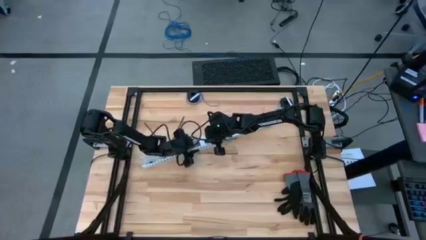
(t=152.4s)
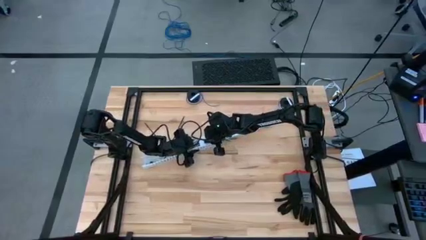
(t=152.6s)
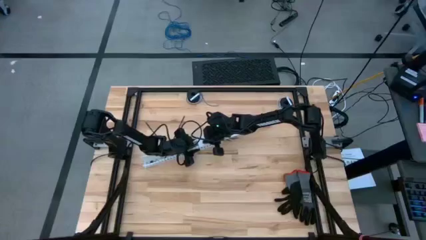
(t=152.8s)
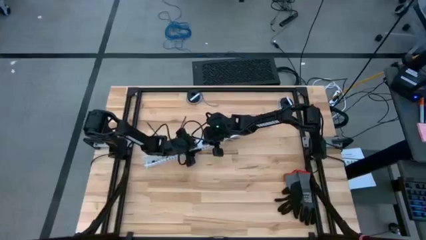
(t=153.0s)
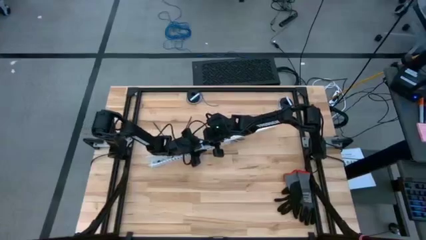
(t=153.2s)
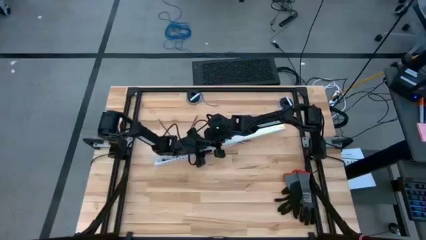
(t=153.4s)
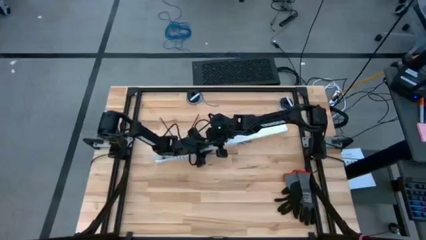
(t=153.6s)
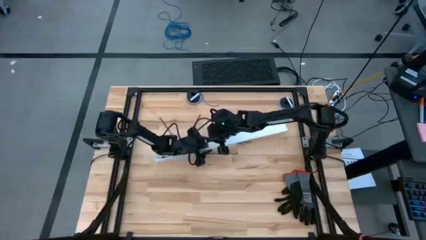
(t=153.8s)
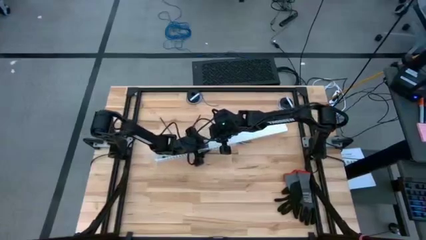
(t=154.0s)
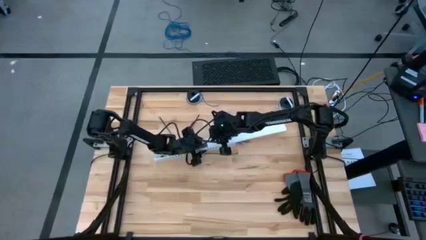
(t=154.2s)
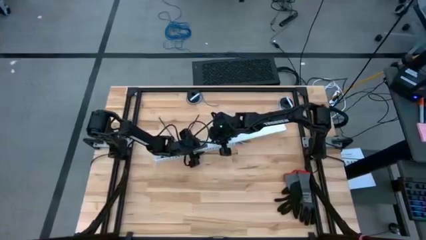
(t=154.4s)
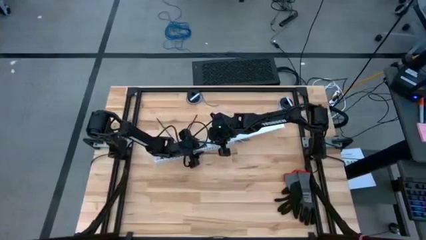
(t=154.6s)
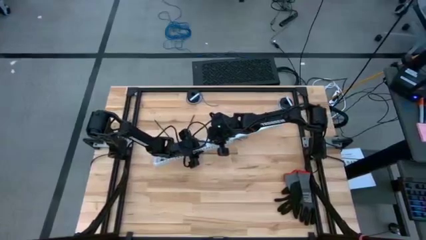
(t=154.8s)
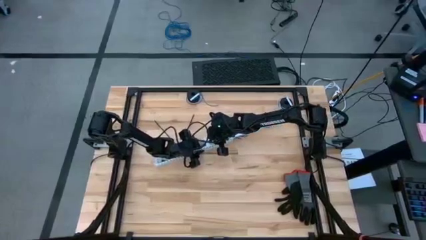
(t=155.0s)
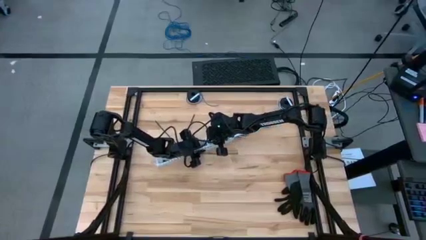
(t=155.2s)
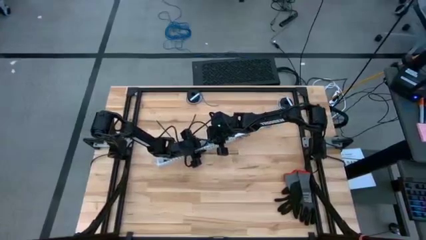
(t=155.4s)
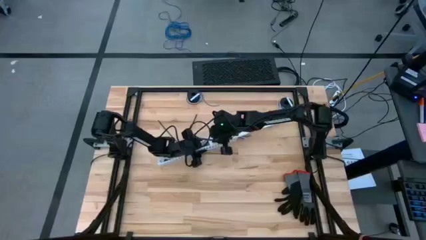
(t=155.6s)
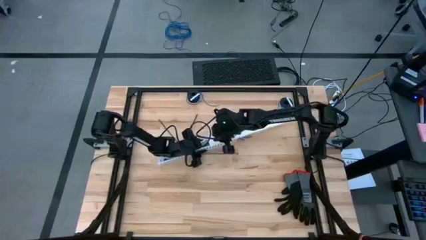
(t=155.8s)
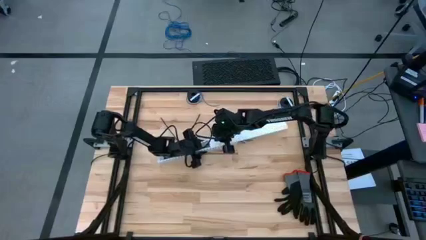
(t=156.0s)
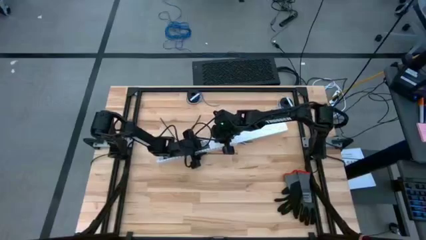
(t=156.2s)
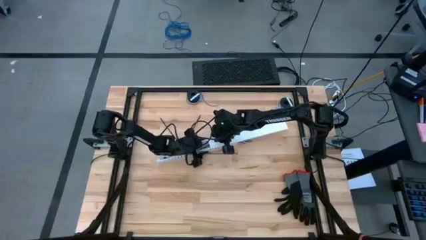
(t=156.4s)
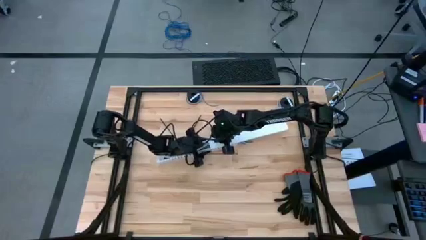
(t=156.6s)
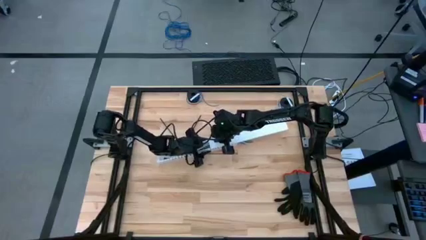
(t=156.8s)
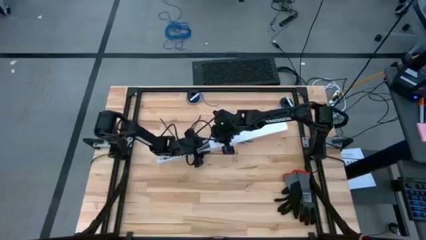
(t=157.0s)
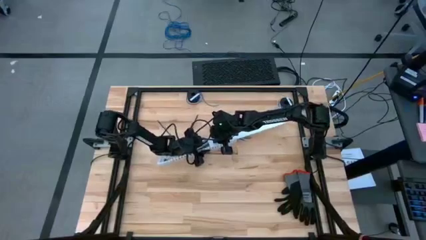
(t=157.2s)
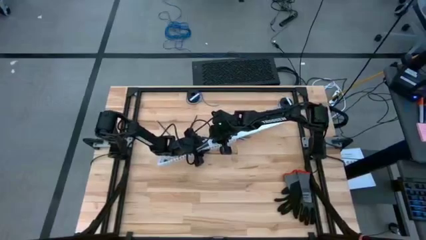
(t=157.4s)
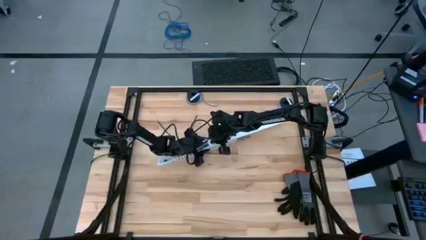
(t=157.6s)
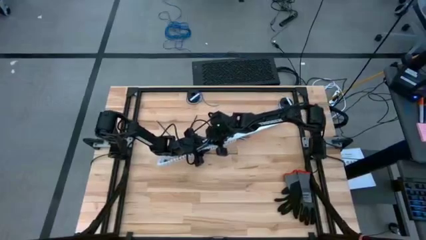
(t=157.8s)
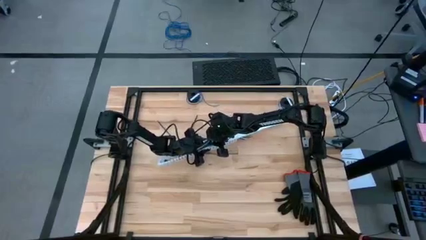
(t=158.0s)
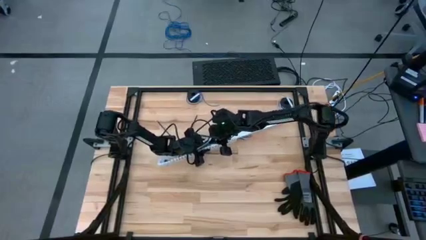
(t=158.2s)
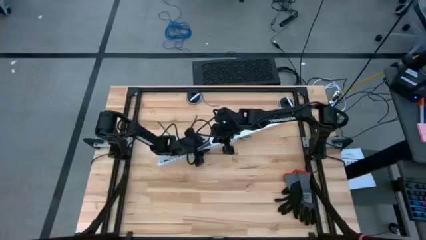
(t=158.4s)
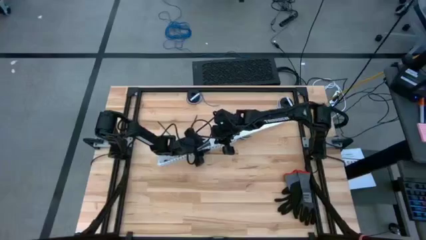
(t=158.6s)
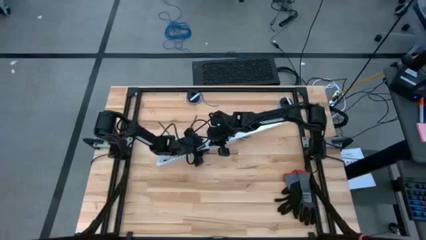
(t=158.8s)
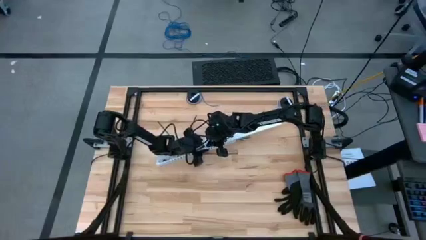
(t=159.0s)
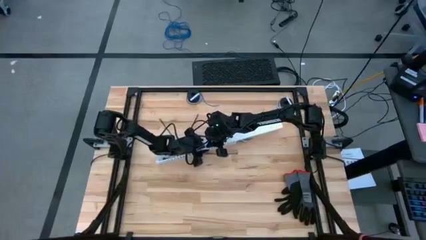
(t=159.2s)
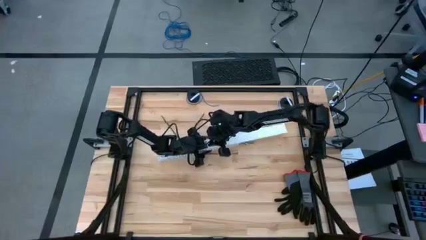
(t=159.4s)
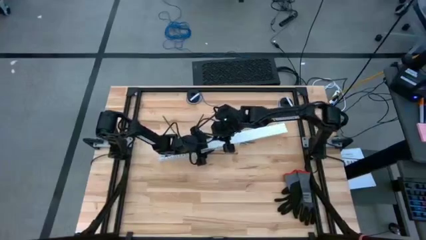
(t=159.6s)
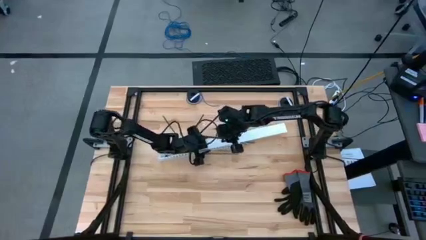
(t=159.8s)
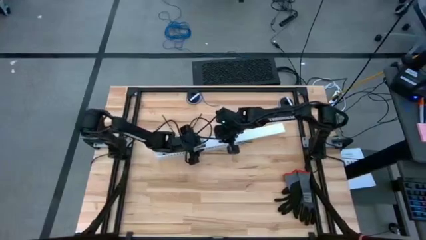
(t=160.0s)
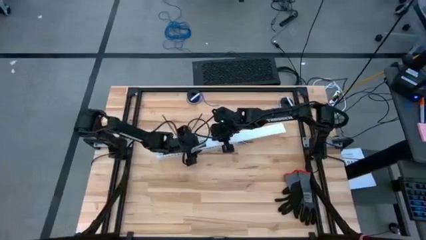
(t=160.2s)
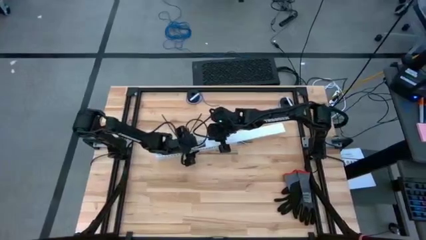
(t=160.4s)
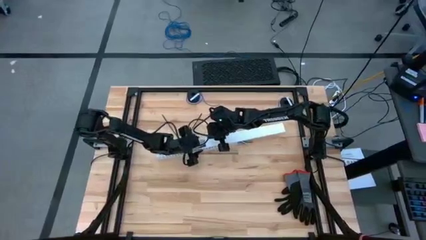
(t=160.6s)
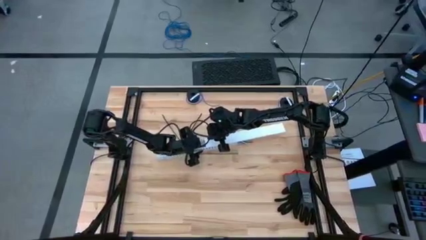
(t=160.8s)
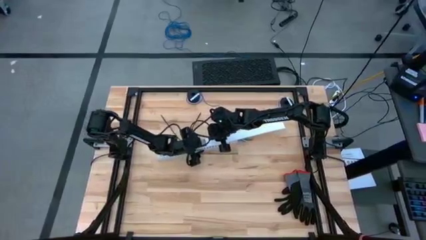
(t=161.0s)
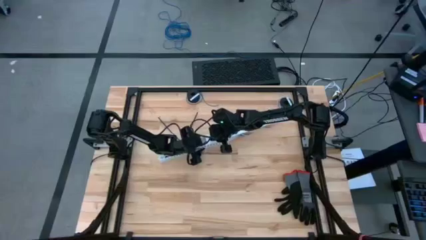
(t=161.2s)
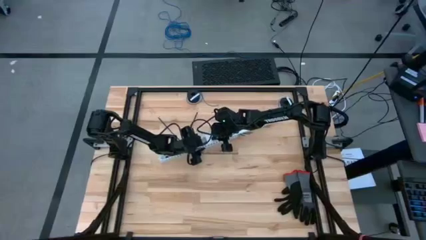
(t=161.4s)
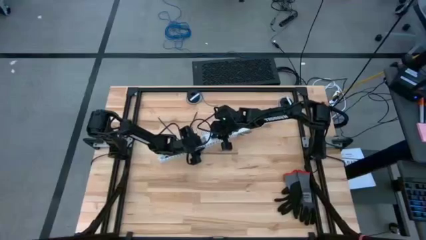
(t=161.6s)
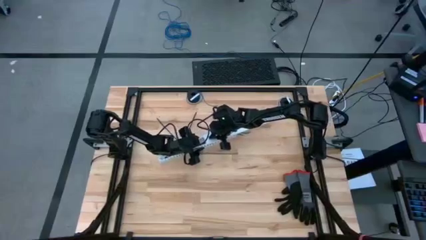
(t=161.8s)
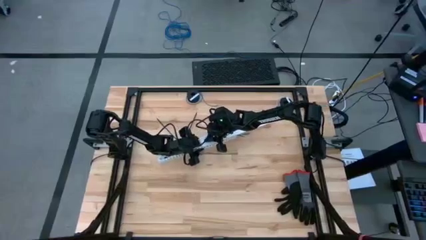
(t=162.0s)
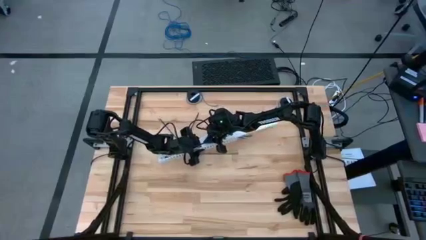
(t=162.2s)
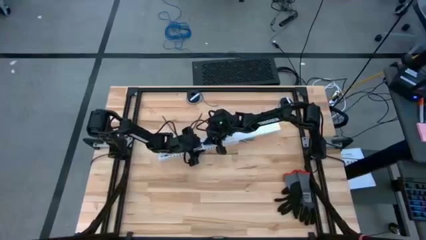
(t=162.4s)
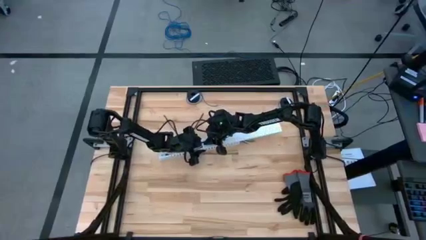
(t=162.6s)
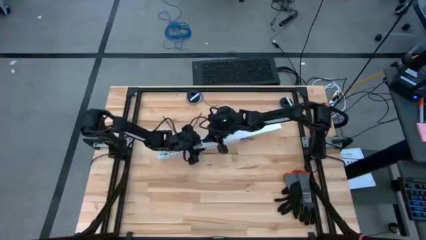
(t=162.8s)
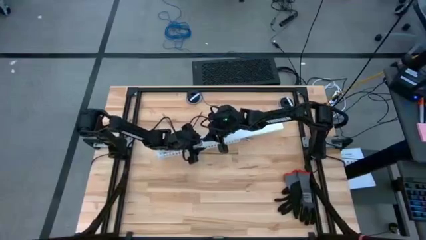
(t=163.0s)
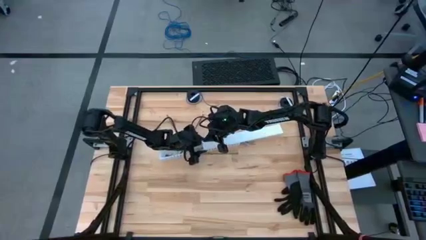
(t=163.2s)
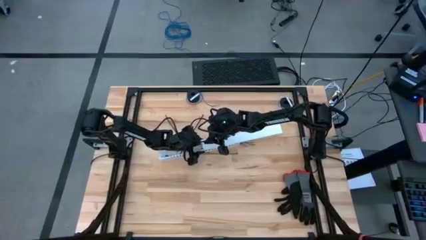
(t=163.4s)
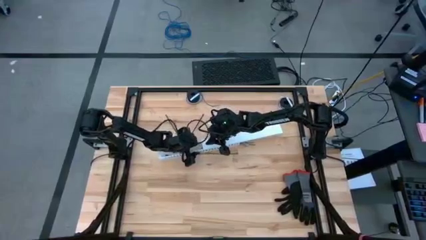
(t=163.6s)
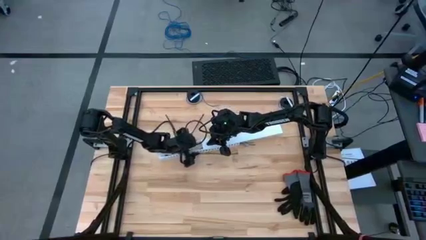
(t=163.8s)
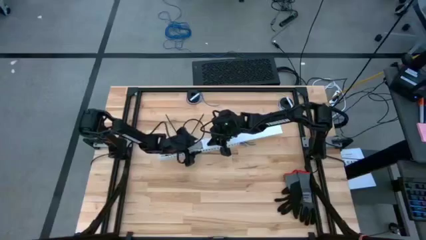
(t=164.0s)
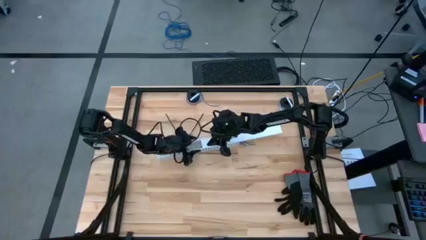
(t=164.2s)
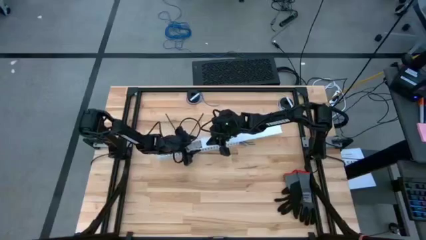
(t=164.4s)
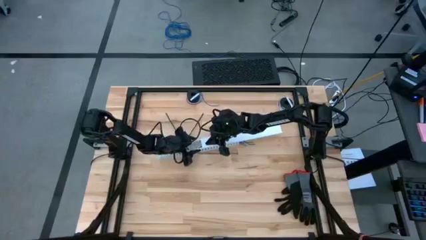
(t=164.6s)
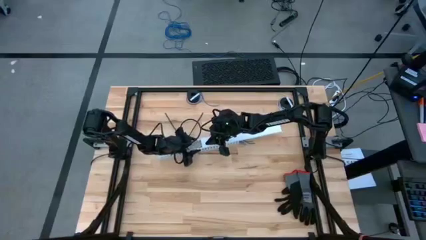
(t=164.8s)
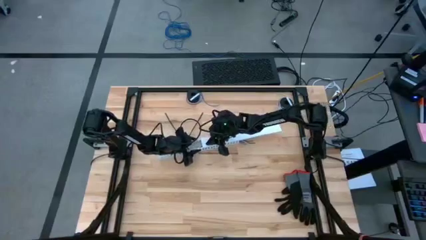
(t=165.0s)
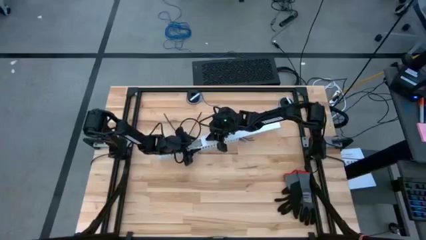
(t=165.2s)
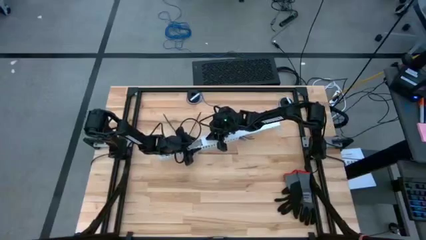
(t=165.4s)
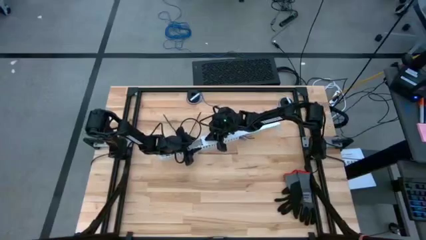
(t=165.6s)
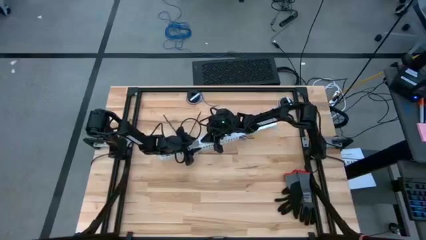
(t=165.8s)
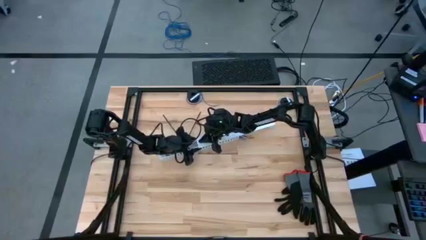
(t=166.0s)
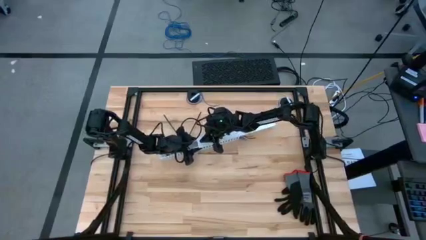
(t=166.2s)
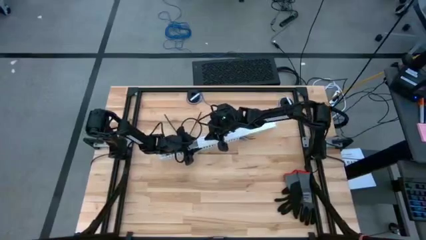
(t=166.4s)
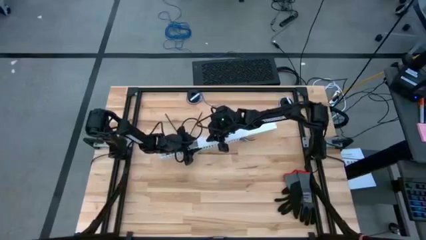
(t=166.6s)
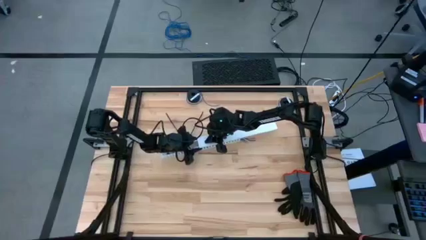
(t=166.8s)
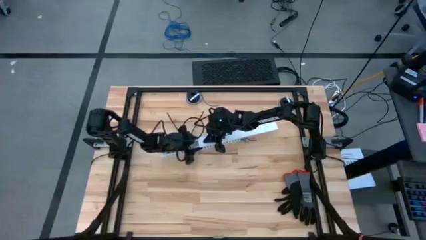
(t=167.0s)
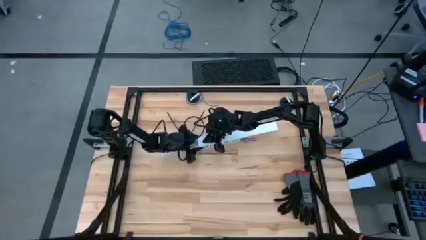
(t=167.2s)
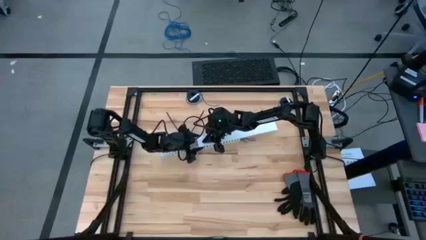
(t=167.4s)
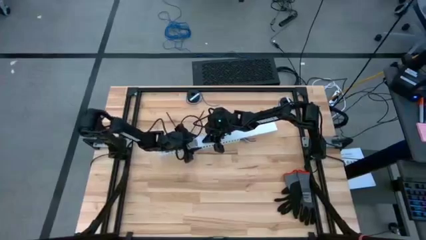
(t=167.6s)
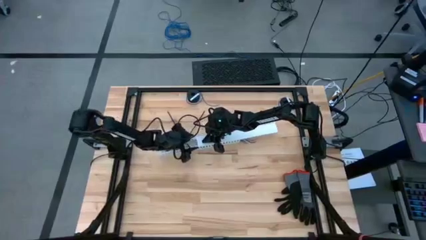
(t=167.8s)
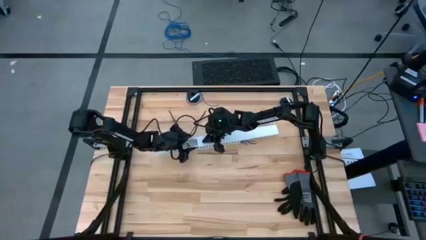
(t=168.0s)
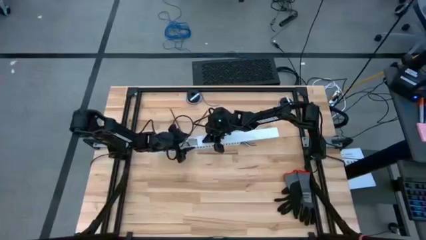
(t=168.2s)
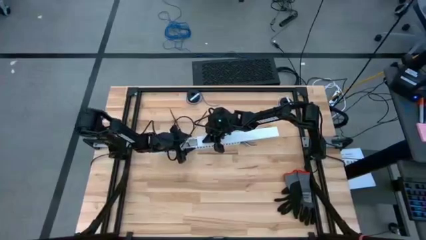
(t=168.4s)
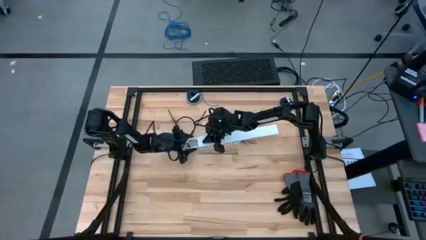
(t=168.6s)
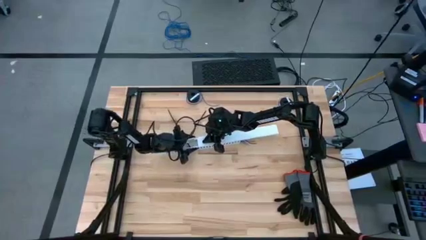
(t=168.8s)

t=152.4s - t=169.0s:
Task: Ziptie cables
Close the white cable duct tray the with white cable cover
